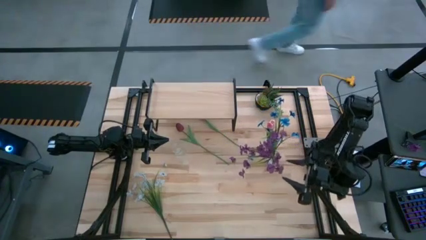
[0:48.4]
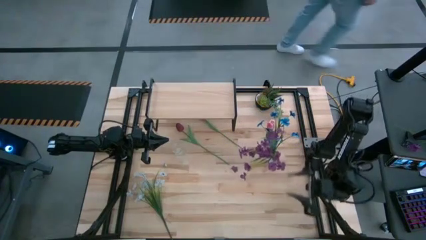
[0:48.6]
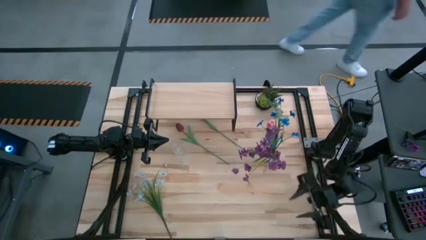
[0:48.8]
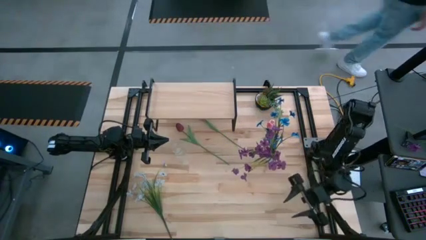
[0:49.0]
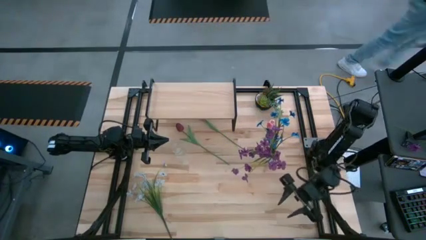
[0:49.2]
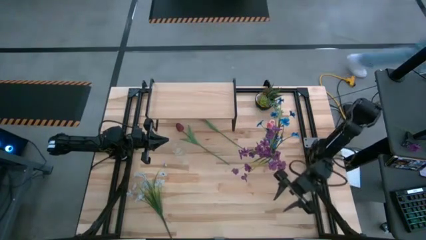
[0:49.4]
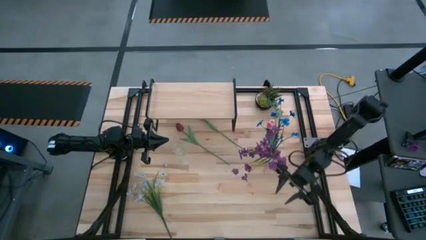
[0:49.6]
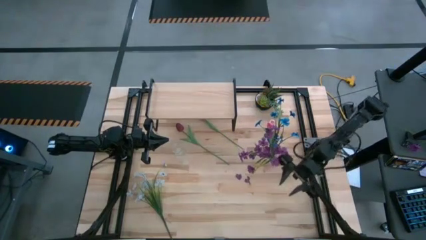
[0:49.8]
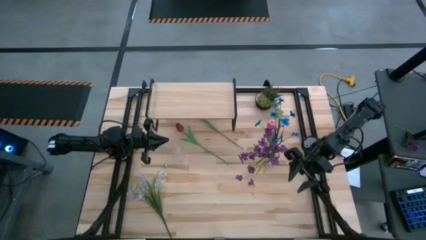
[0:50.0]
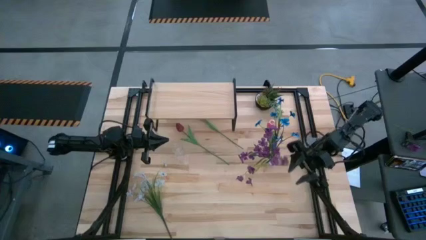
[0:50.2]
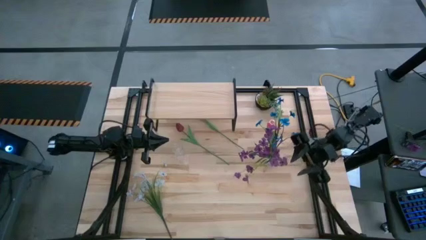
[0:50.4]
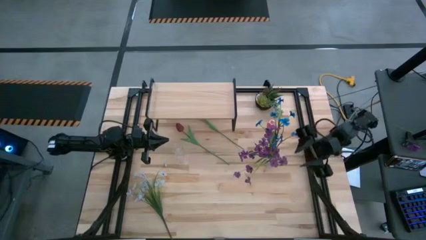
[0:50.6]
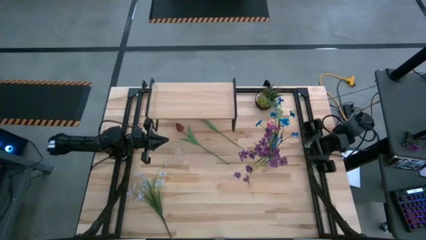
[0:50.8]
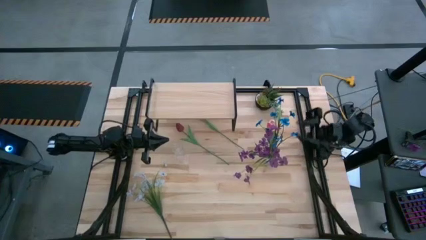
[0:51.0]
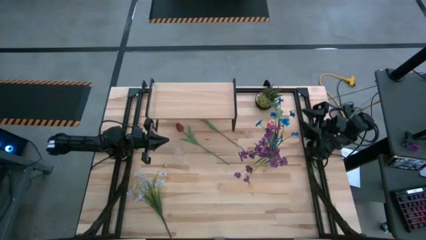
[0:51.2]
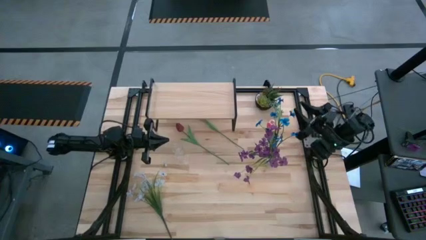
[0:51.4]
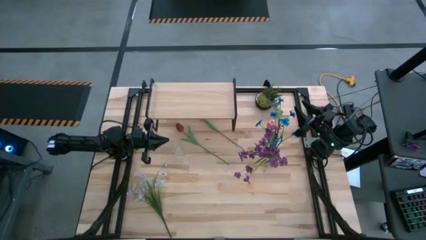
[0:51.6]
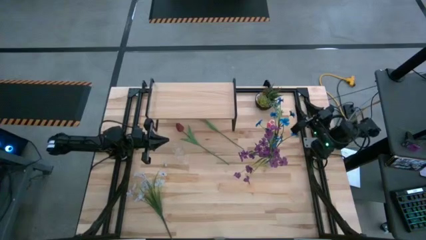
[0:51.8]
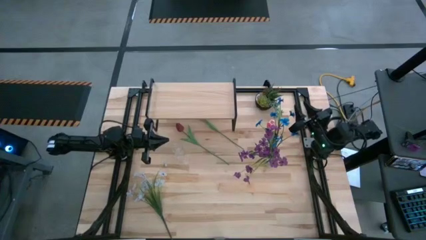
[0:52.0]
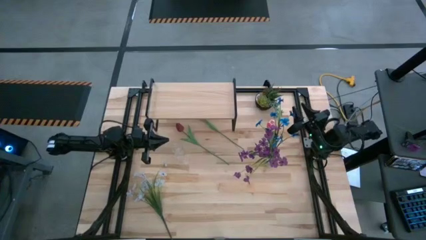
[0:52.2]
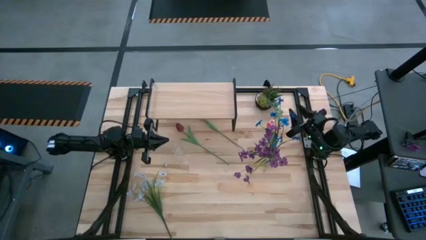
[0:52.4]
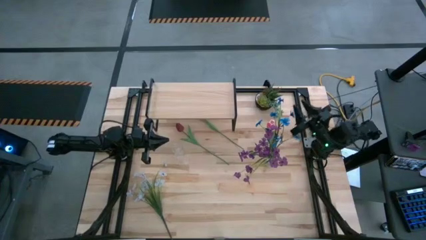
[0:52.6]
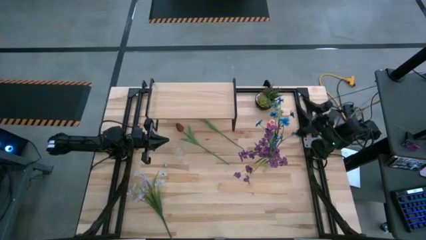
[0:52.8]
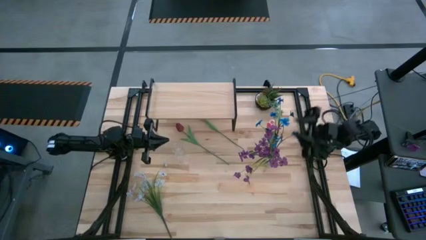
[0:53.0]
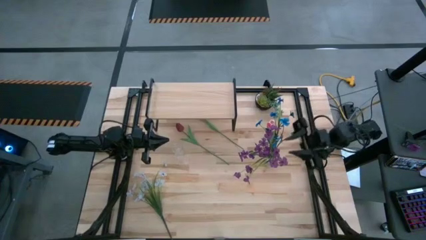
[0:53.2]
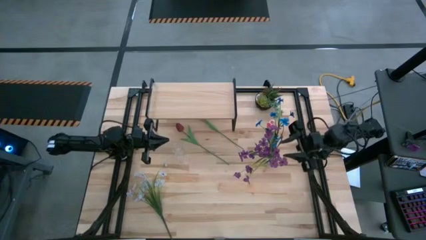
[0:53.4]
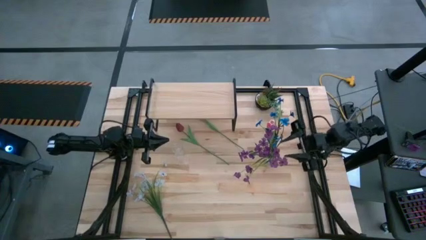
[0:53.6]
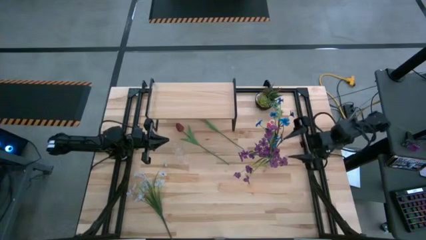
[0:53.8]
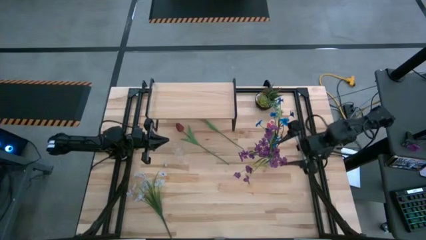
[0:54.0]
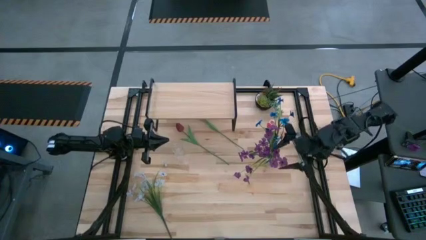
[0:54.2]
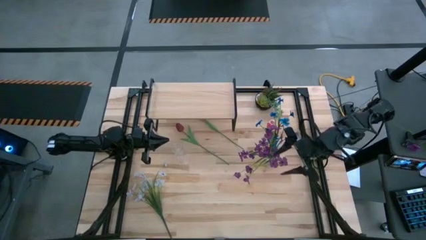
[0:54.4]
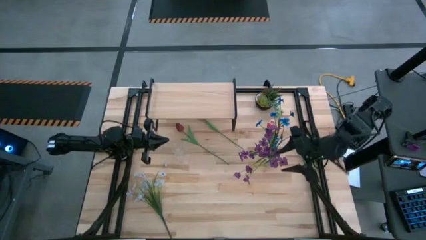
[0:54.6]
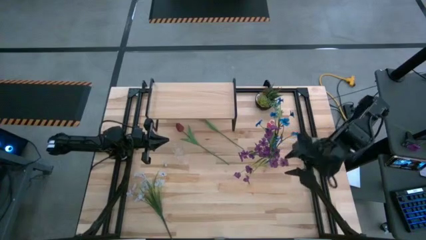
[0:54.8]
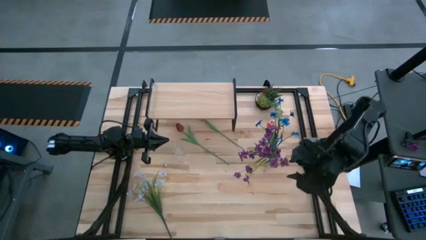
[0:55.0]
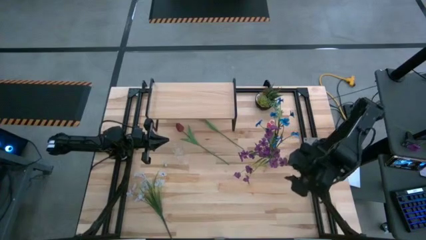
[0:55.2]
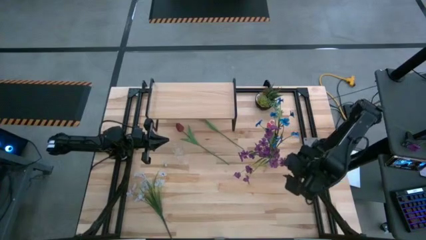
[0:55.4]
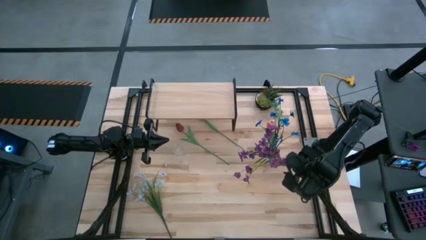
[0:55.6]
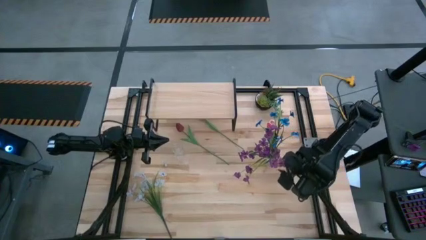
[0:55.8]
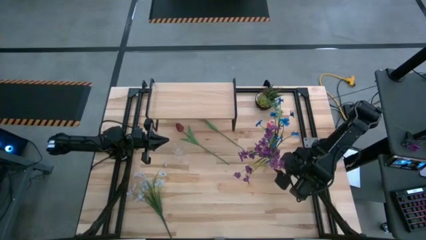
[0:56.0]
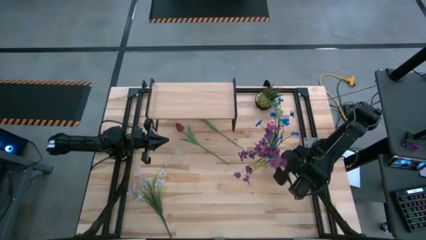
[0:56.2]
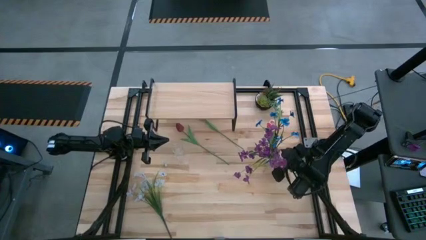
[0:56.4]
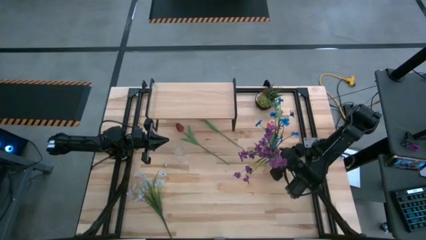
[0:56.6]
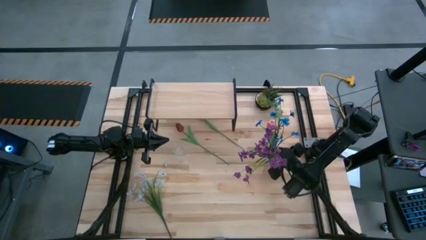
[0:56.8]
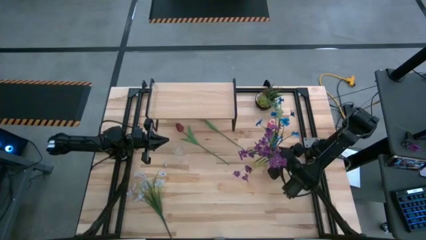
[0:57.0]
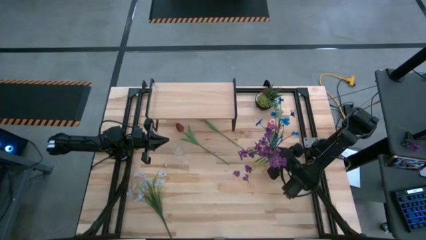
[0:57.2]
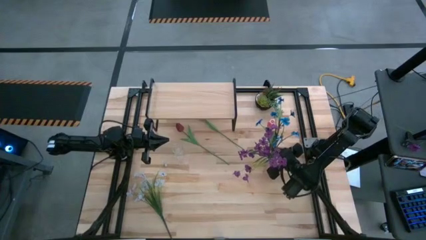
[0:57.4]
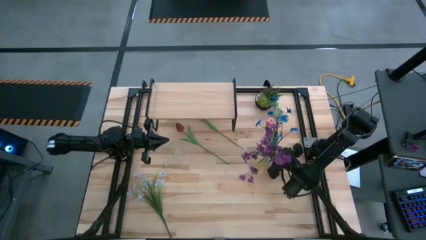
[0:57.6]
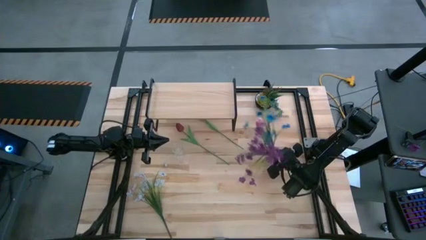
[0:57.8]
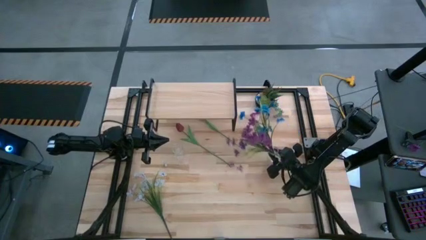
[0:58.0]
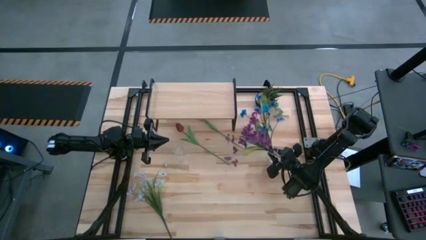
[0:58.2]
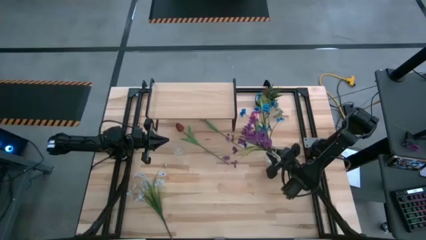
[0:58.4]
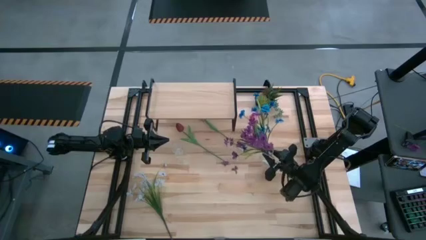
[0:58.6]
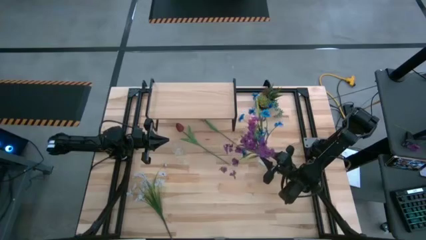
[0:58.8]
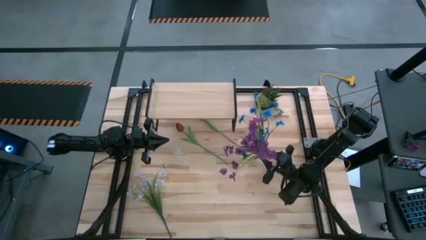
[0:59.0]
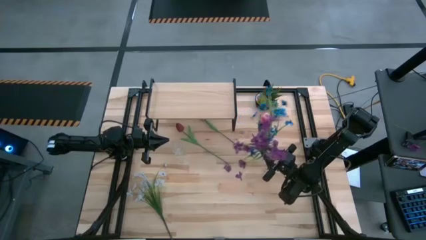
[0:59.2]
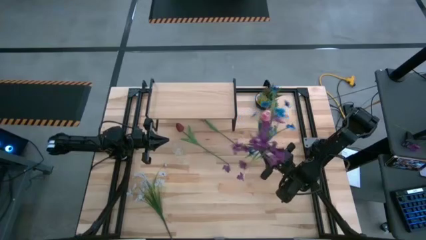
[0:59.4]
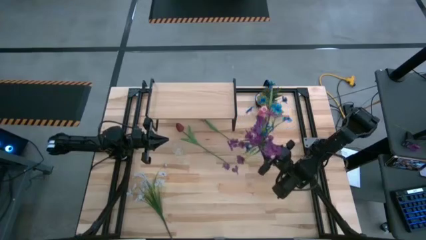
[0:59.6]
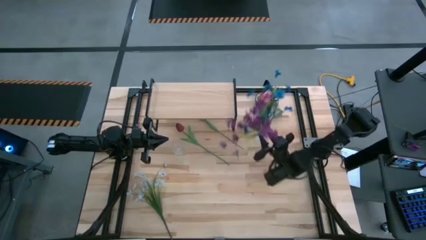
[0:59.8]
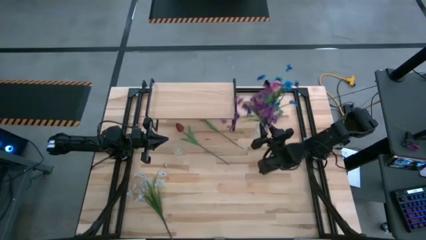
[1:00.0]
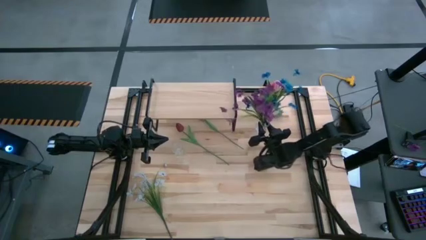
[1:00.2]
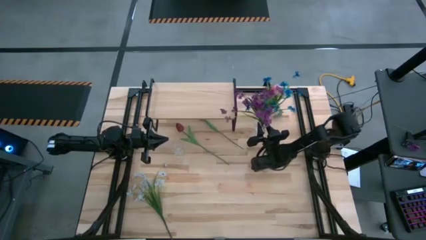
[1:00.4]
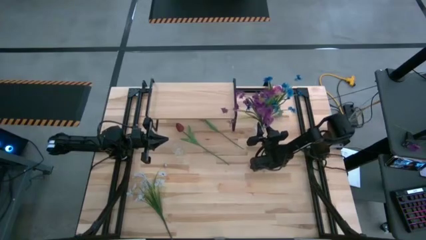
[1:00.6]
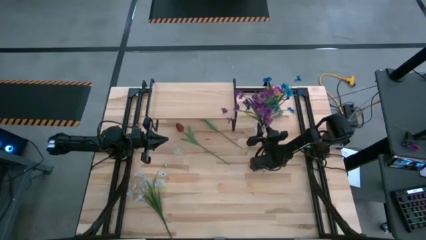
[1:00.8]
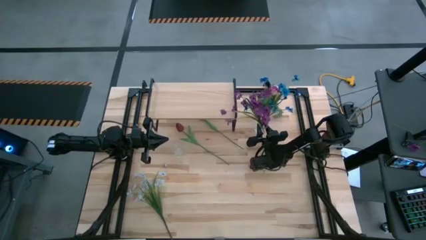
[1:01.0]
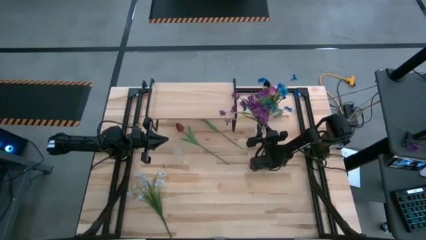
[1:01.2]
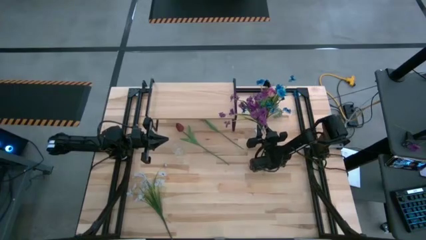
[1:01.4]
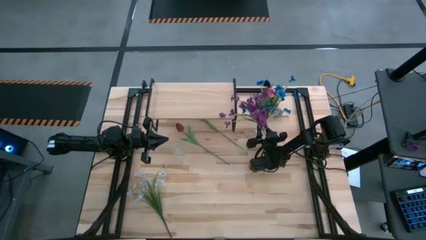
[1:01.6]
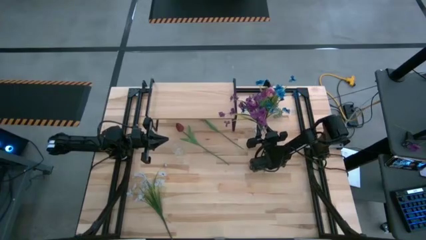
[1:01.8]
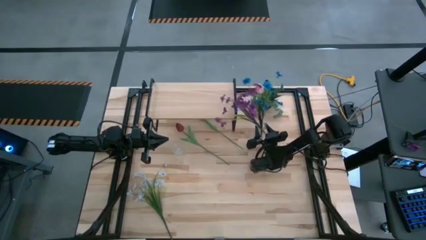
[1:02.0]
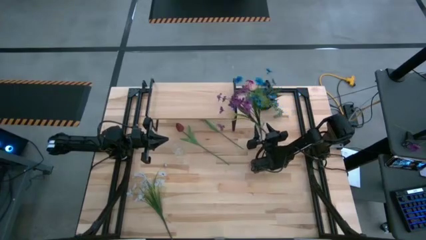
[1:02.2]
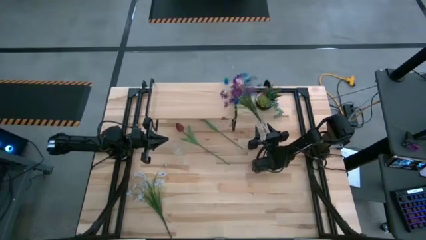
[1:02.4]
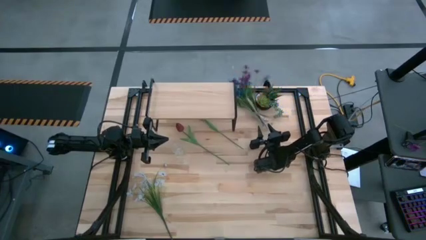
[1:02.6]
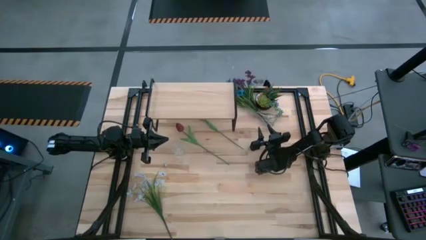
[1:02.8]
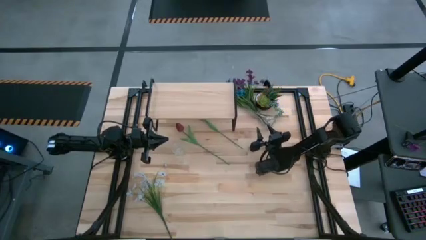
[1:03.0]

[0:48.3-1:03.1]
Task: Pick and place flowers into a vace then onto a shelf
Adjust the right transparent vase
